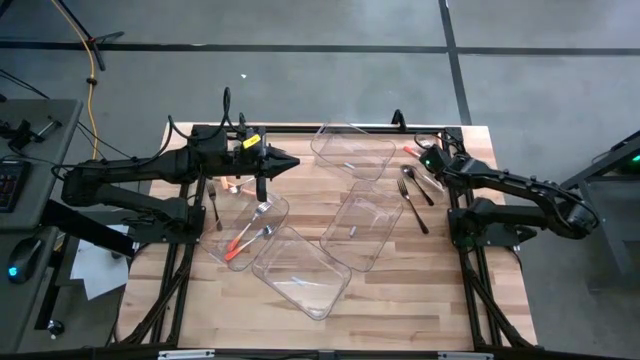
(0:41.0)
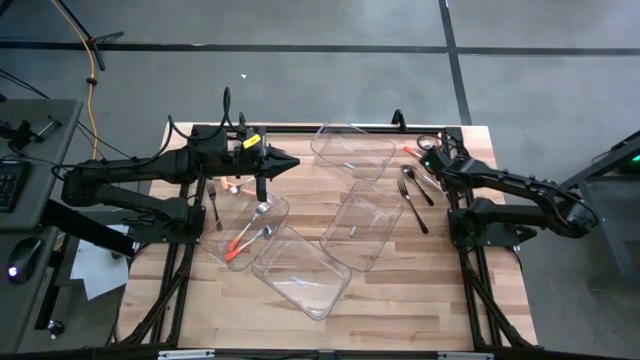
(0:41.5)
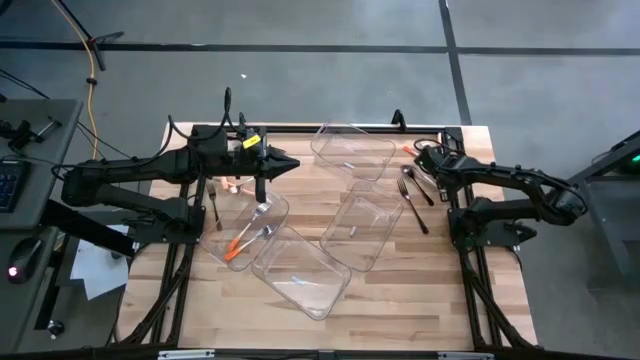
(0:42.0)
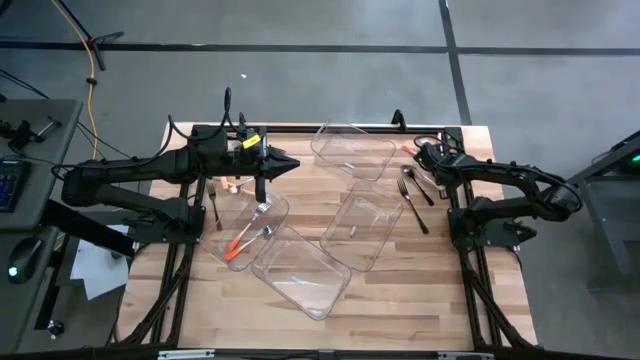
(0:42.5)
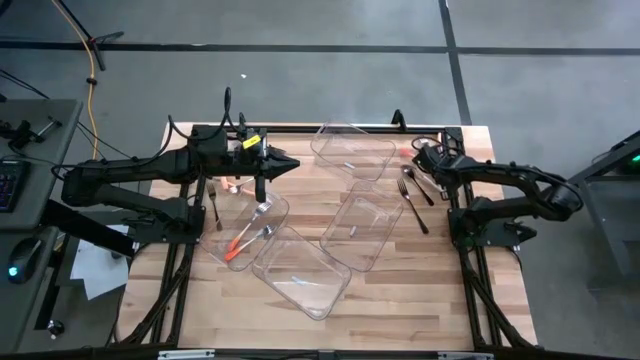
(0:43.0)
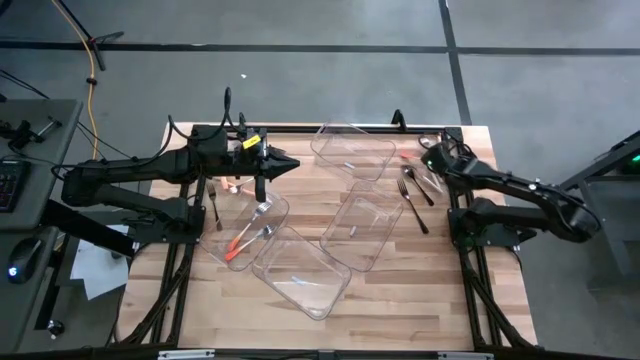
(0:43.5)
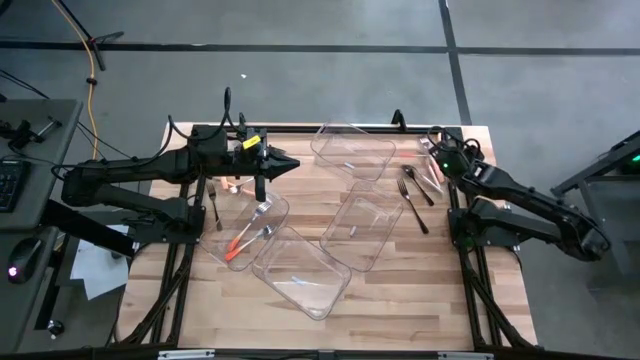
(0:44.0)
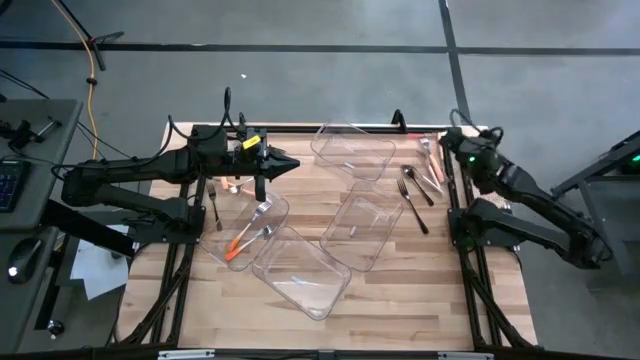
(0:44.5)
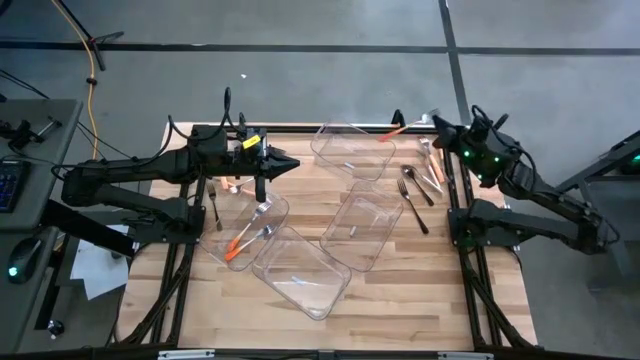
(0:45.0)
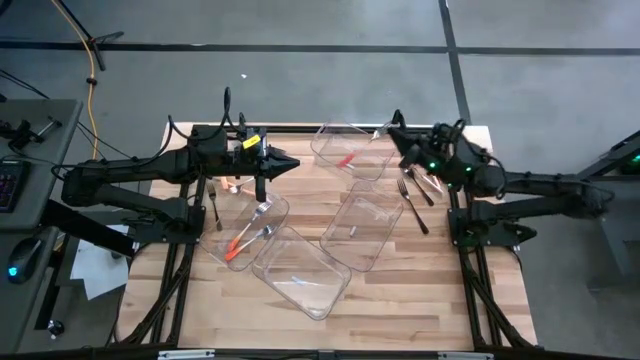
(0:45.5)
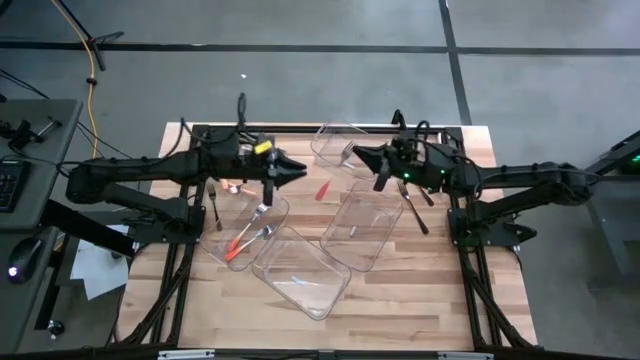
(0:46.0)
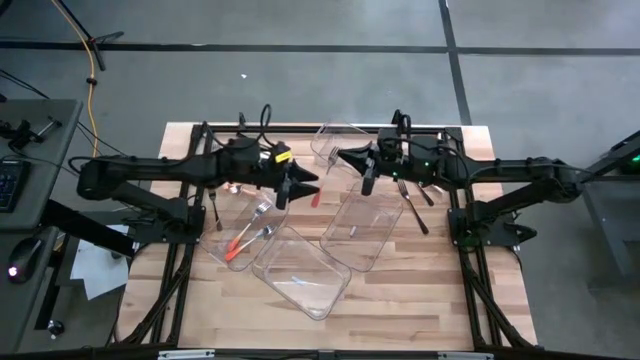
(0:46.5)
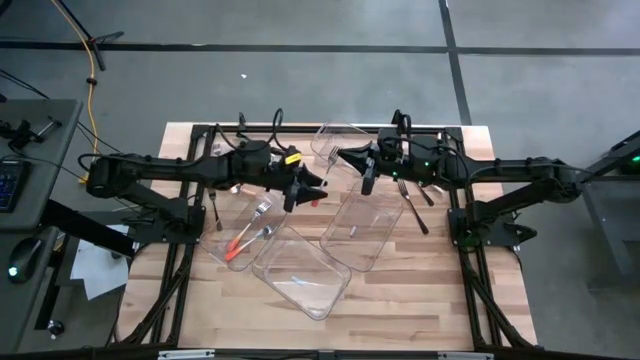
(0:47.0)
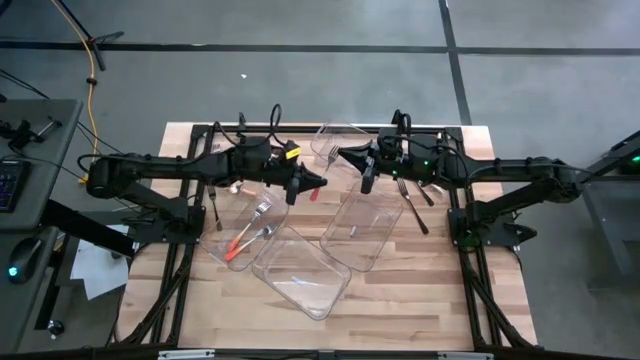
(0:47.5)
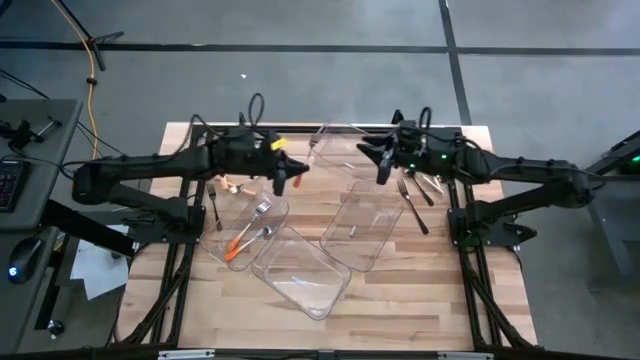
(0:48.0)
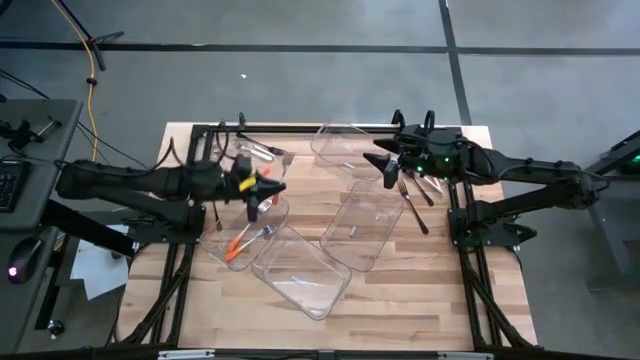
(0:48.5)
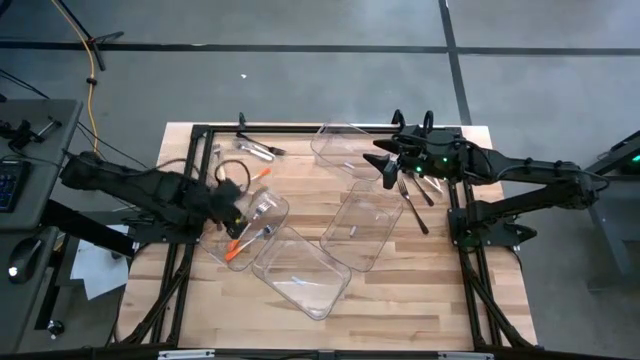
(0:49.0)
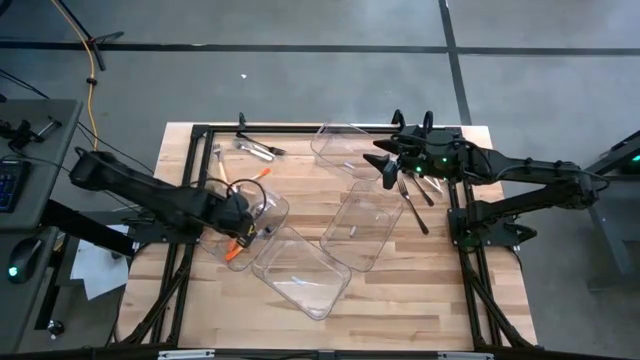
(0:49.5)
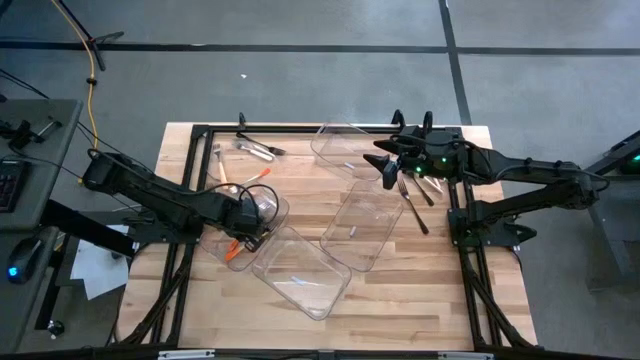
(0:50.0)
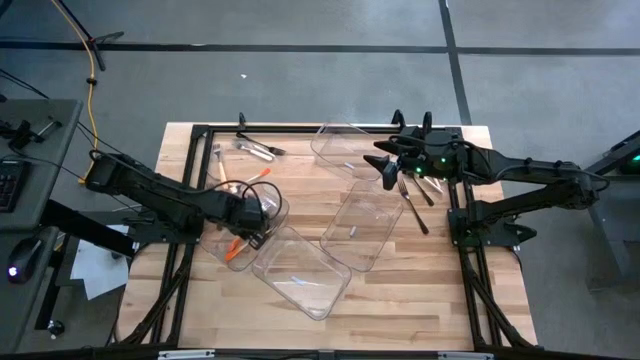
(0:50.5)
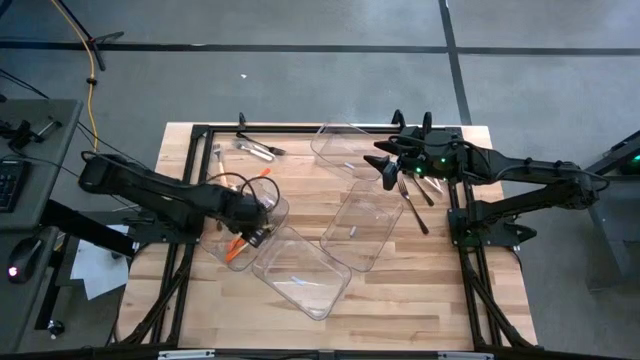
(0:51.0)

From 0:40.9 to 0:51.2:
Task: Sort silverware by color (type)
Put the orange fork into the middle left transparent bin

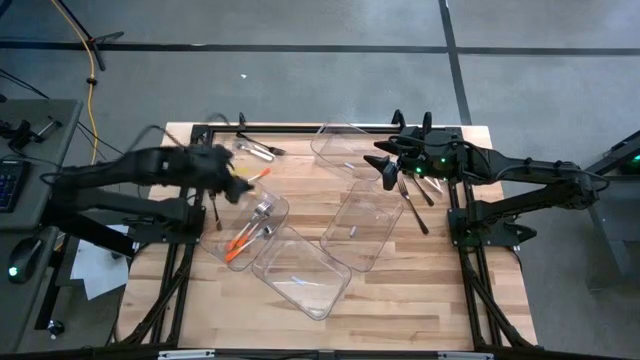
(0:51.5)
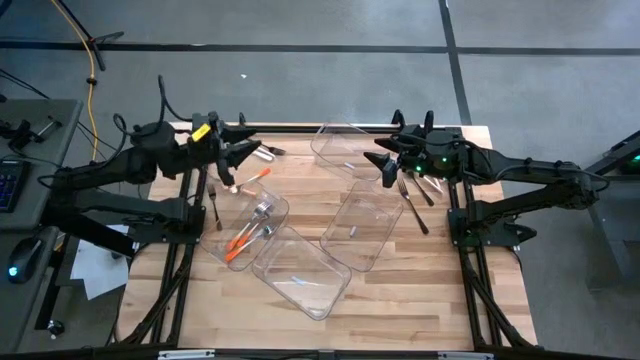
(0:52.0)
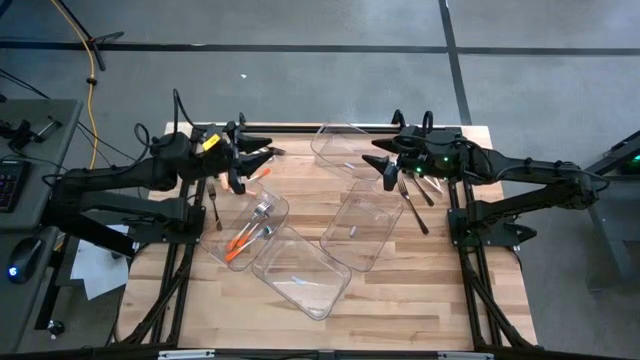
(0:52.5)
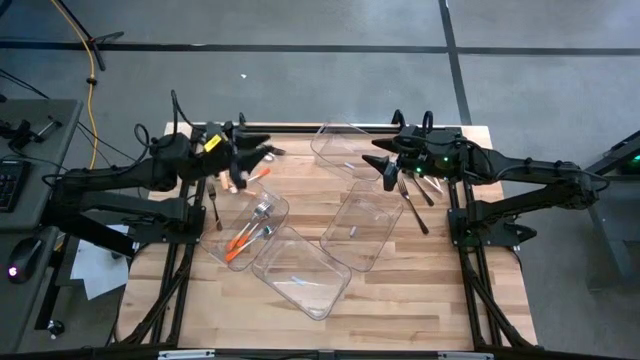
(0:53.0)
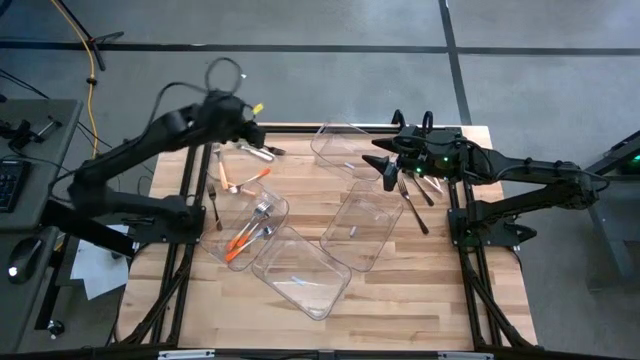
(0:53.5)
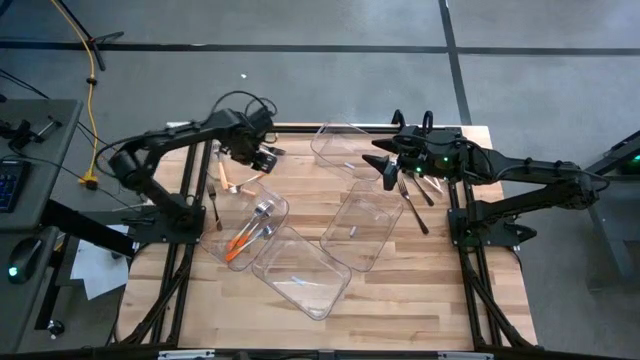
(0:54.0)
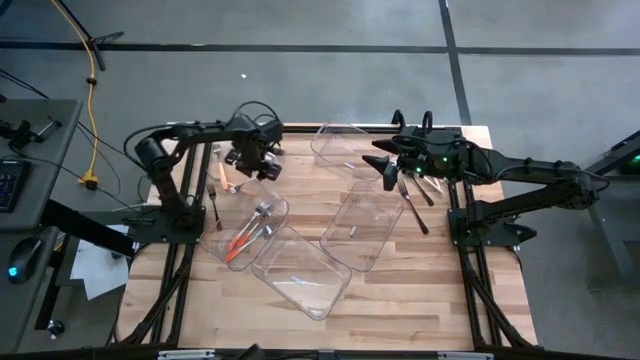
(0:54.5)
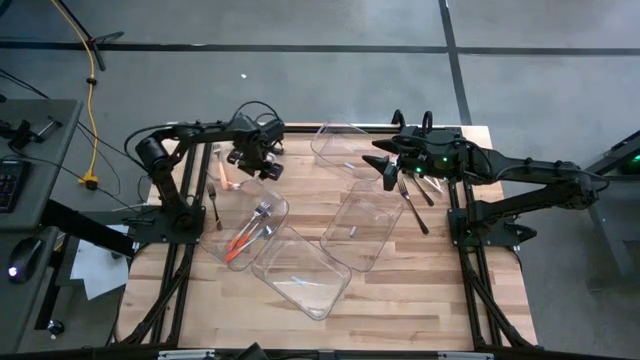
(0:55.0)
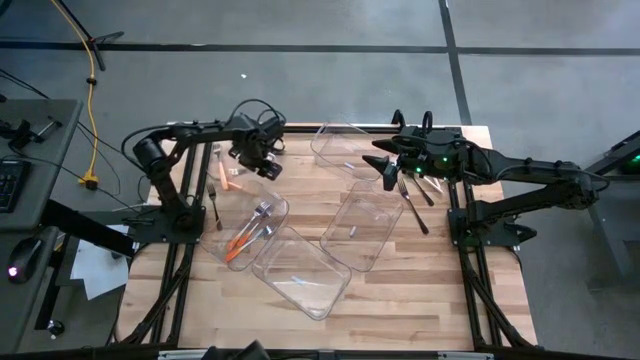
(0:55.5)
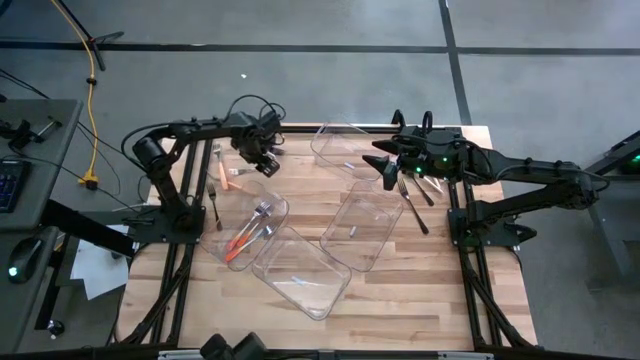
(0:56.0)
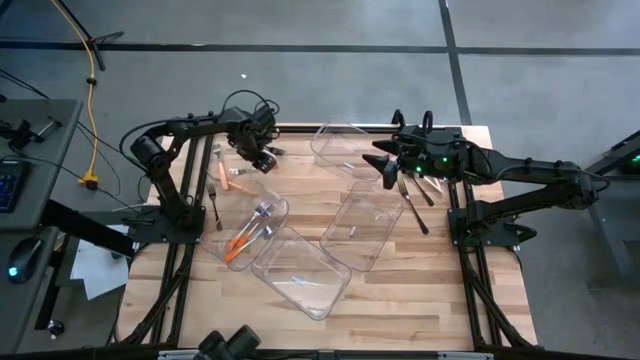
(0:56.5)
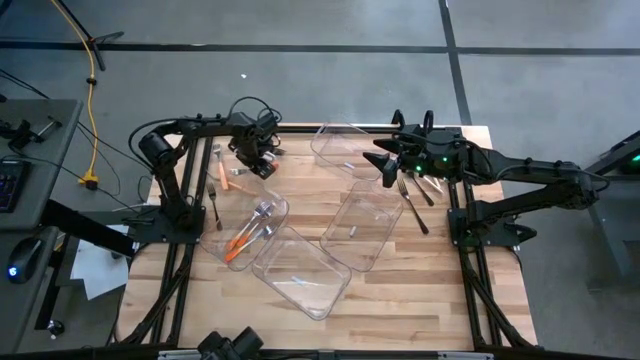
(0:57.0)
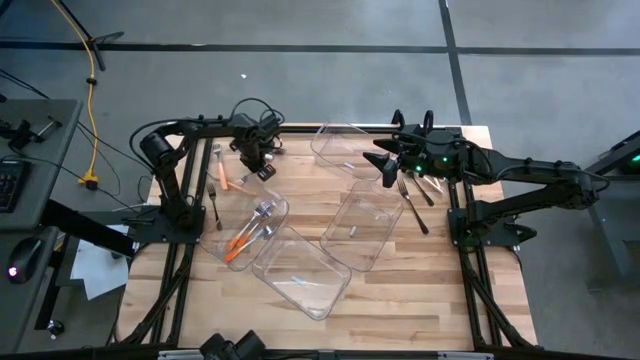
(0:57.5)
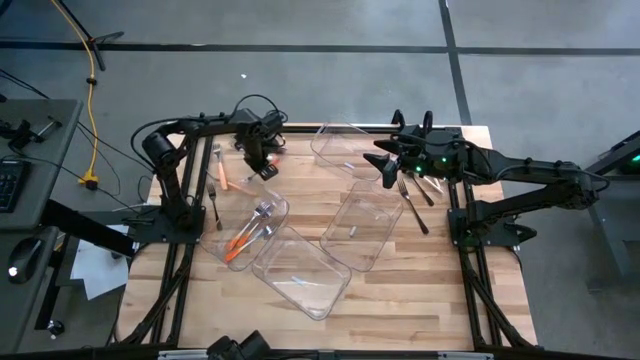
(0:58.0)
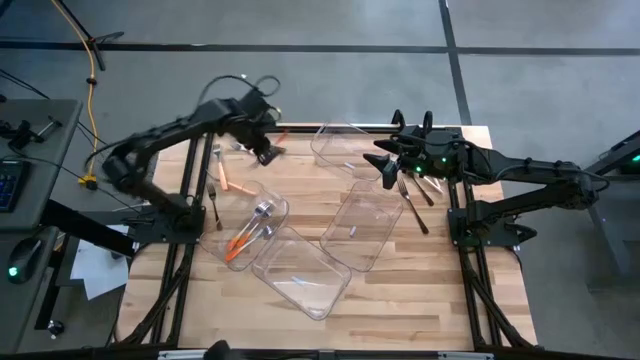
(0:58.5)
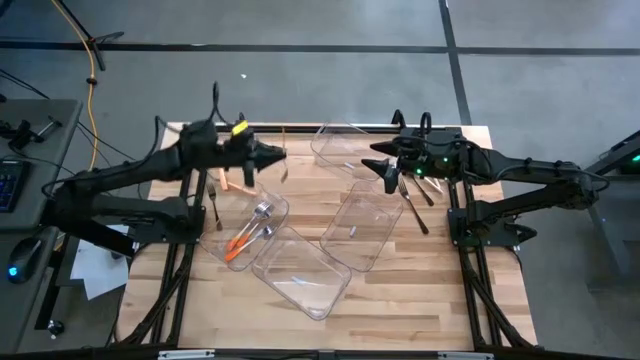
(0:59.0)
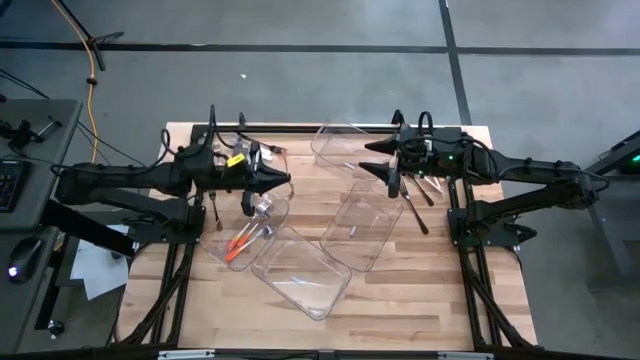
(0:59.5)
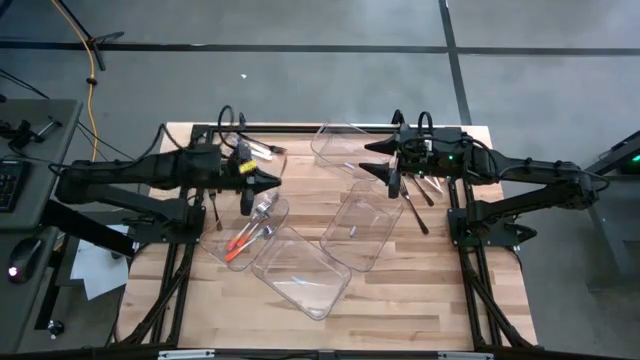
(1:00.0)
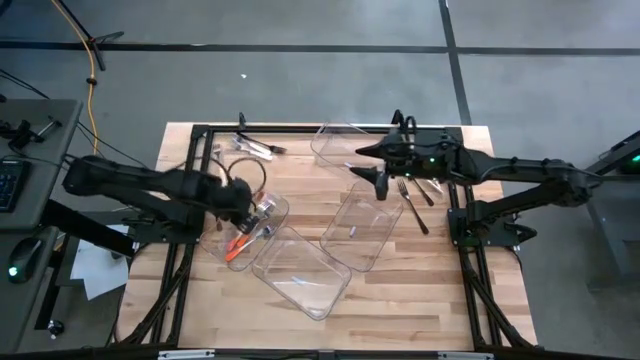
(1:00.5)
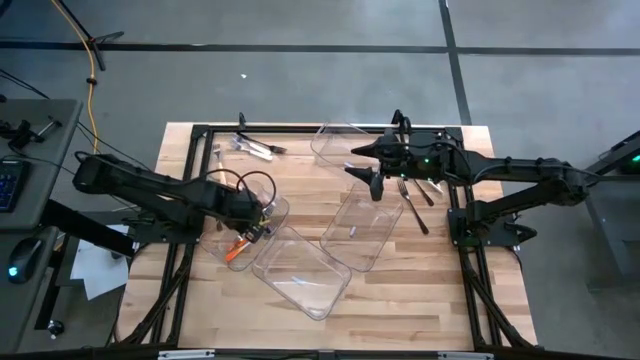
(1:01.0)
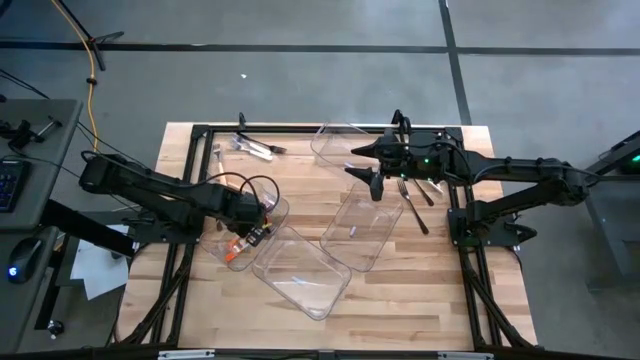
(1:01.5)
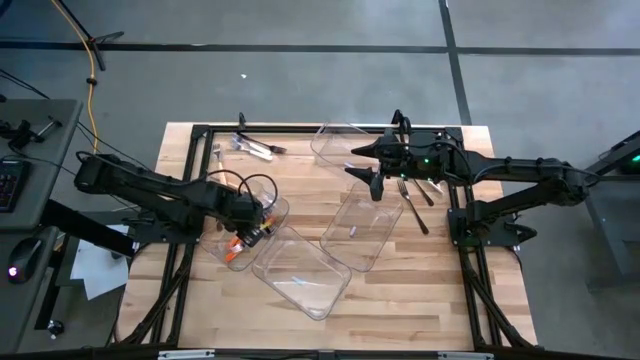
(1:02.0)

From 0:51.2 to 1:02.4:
Put the orange fork into the middle left transparent bin
